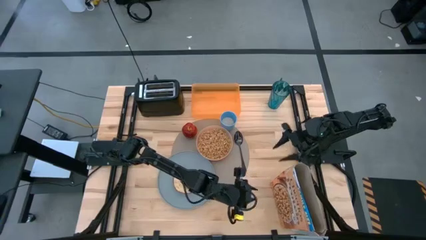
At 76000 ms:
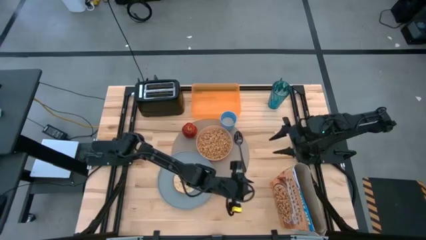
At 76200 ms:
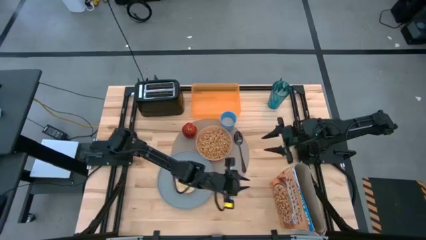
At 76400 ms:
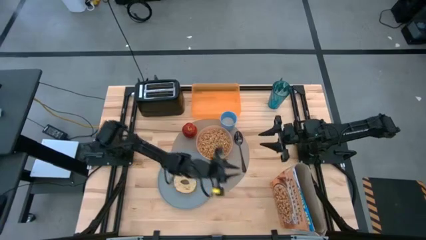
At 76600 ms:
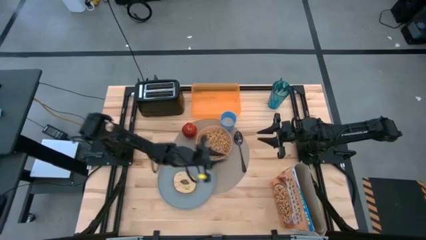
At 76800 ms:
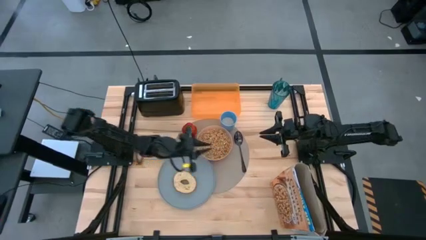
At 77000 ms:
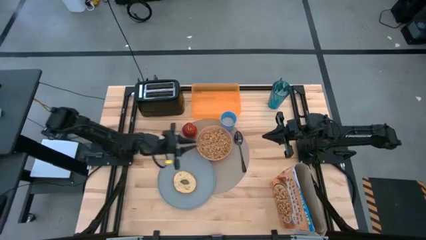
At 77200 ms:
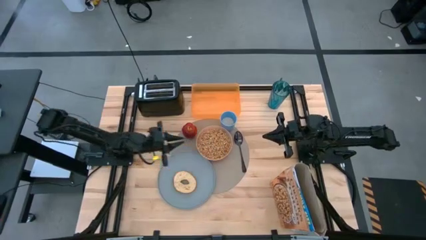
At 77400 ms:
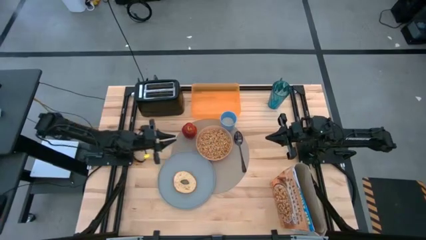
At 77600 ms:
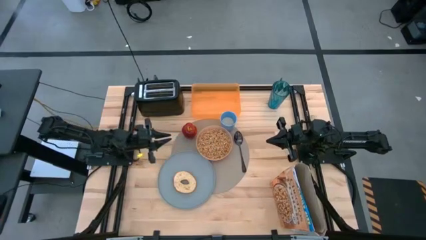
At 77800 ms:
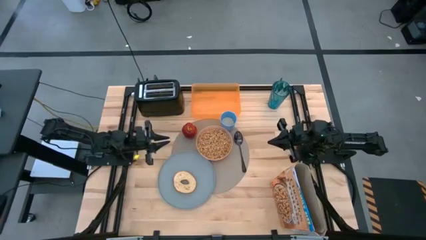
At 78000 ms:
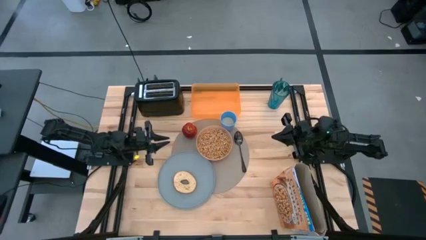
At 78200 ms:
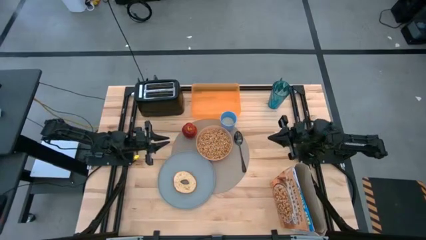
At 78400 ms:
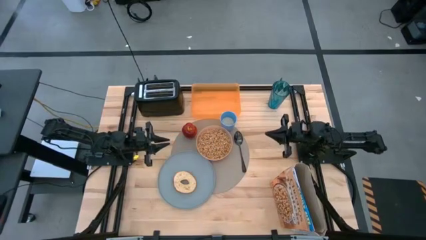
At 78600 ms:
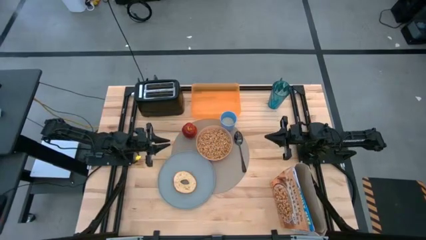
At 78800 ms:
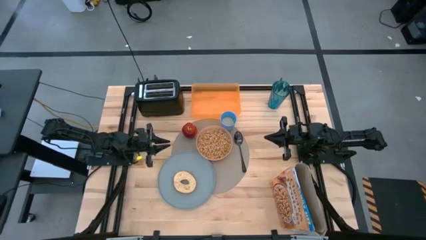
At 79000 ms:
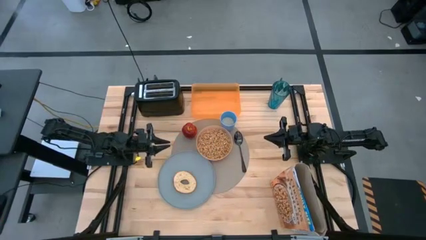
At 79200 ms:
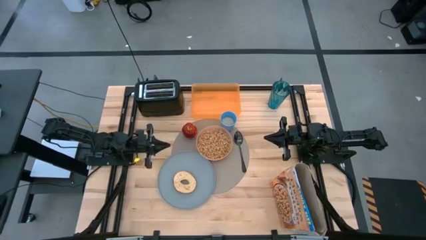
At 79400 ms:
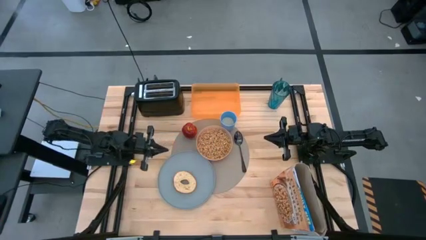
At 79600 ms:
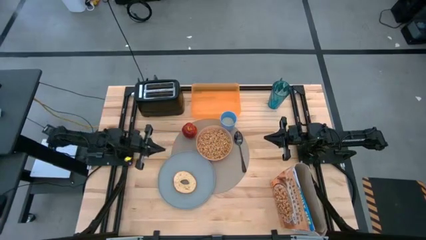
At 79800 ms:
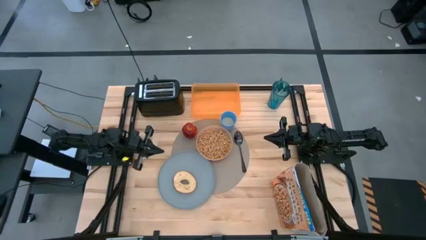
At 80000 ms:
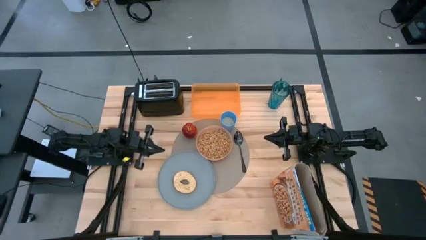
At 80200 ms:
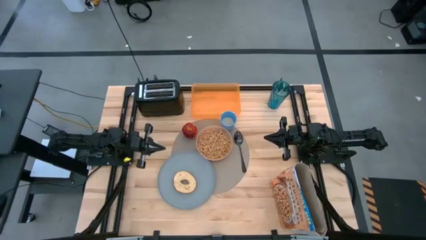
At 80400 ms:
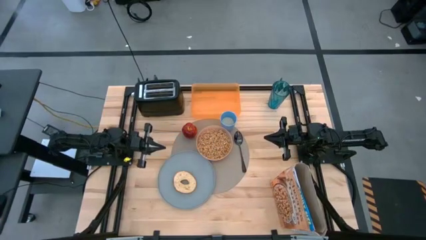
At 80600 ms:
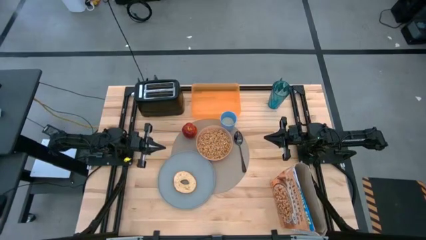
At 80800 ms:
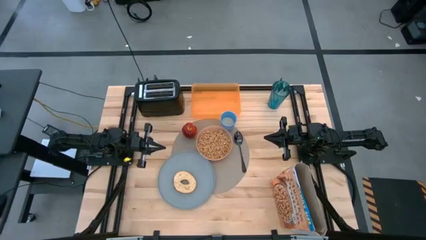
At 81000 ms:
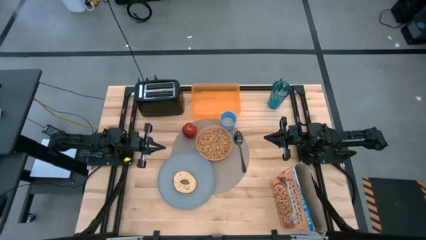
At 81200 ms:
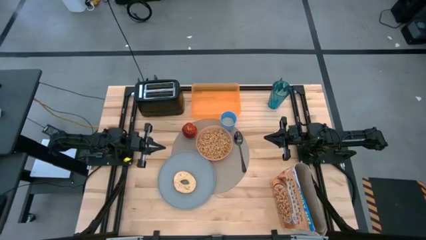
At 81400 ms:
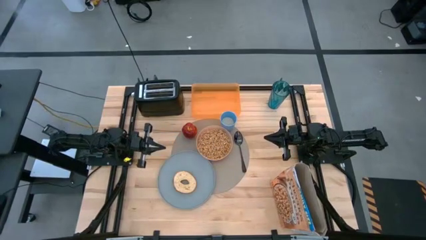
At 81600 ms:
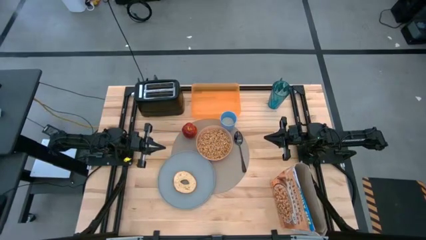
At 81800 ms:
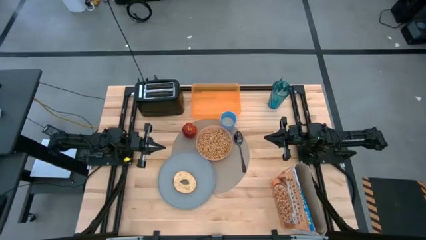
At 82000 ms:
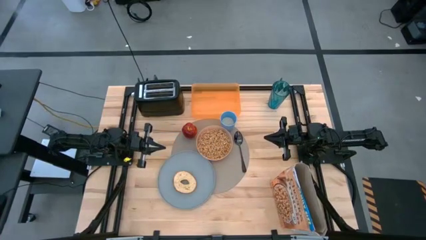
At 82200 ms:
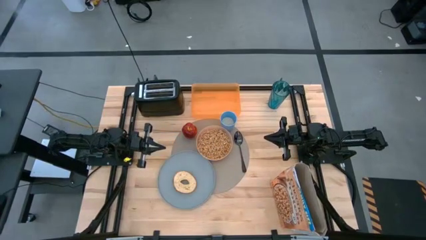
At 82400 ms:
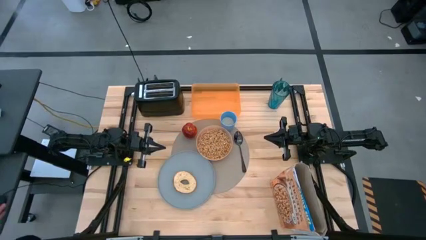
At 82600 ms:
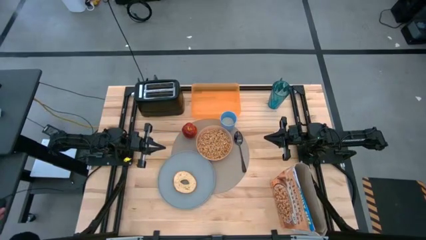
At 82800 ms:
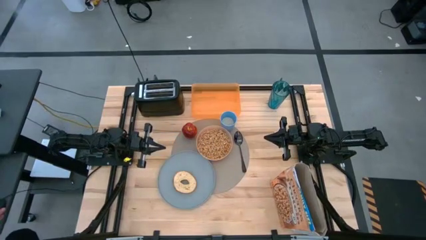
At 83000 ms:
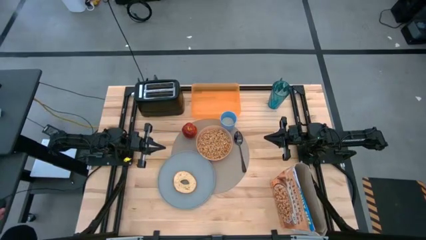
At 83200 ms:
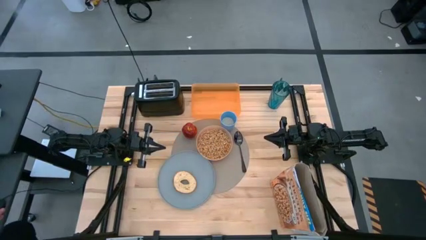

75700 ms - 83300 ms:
Task: Arrange a breakfast setting
Return to Home Position

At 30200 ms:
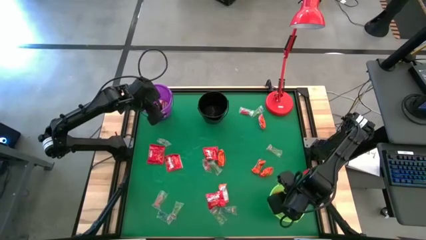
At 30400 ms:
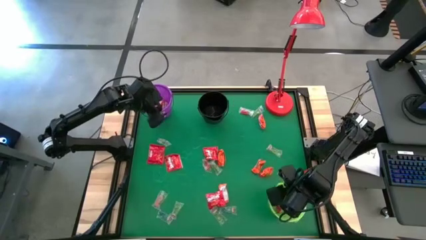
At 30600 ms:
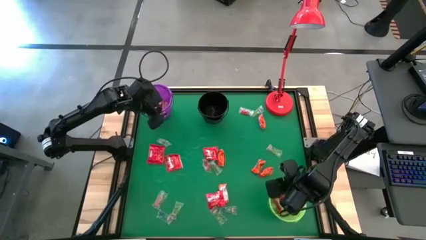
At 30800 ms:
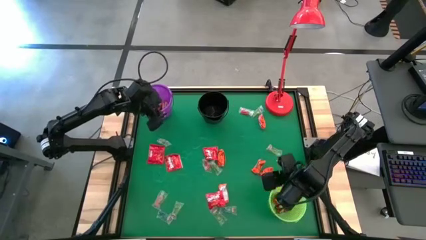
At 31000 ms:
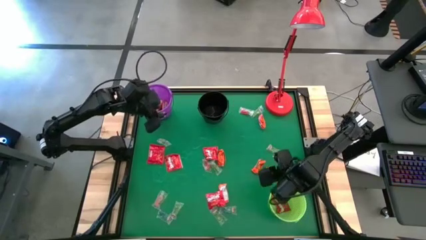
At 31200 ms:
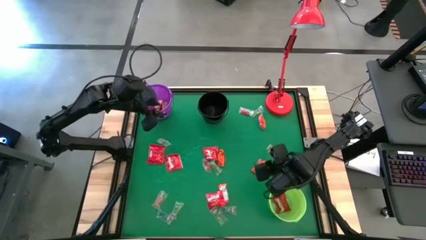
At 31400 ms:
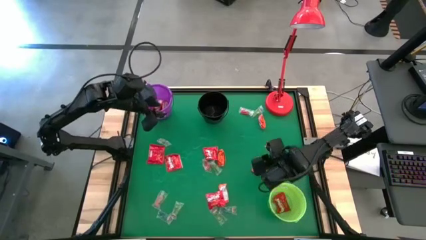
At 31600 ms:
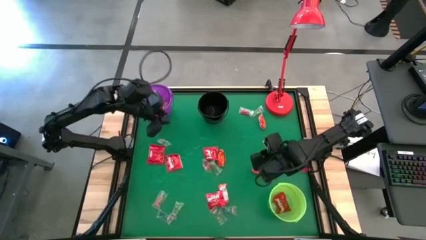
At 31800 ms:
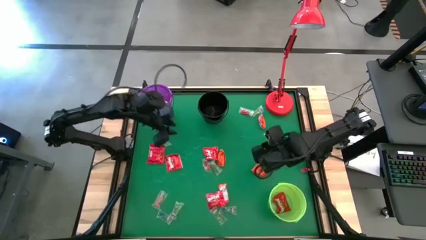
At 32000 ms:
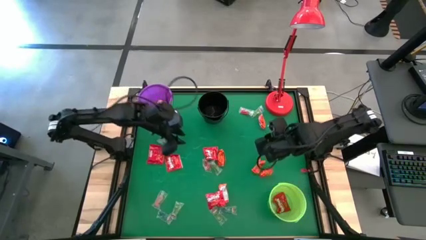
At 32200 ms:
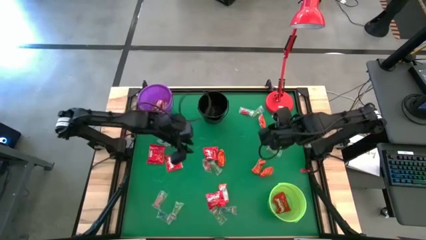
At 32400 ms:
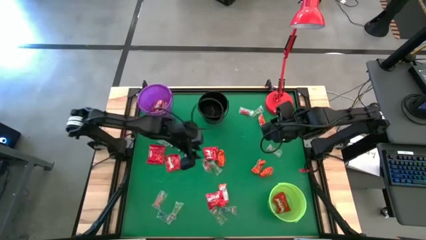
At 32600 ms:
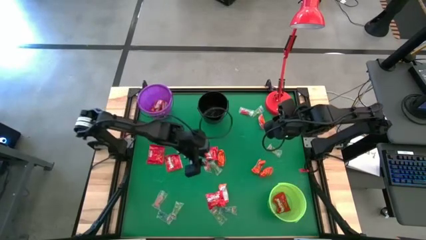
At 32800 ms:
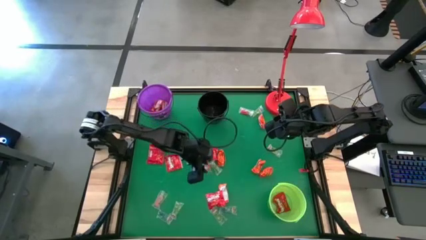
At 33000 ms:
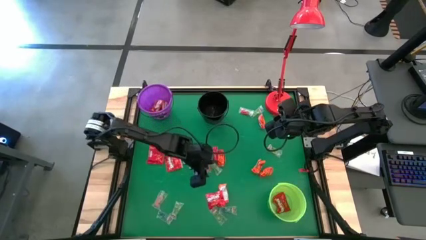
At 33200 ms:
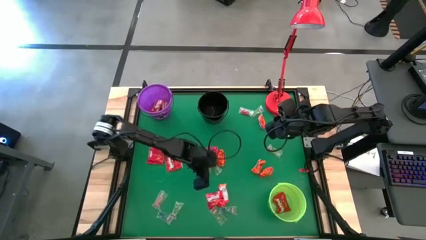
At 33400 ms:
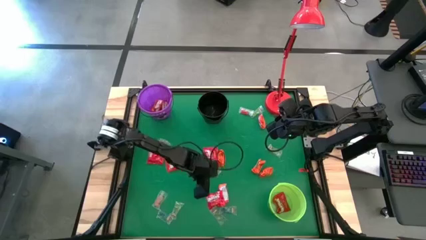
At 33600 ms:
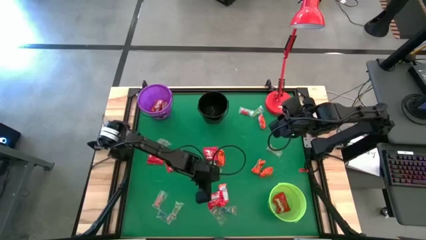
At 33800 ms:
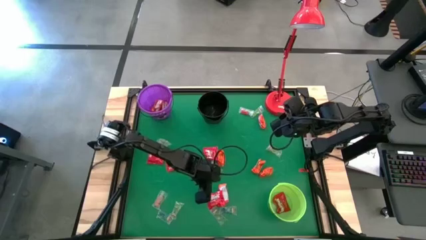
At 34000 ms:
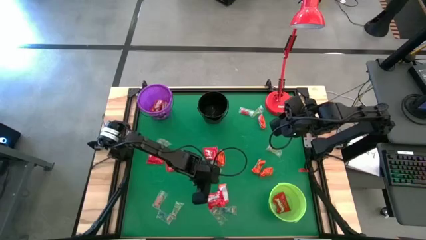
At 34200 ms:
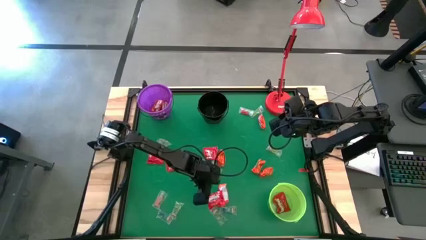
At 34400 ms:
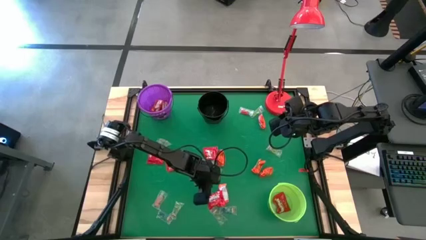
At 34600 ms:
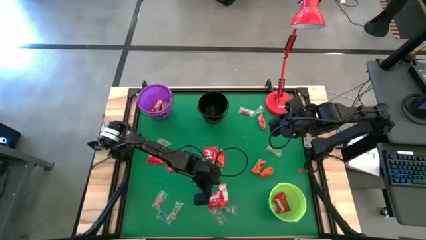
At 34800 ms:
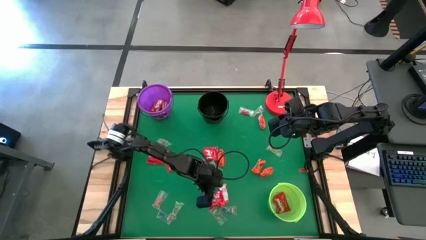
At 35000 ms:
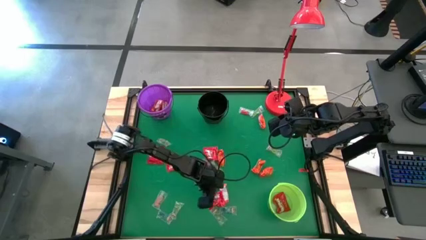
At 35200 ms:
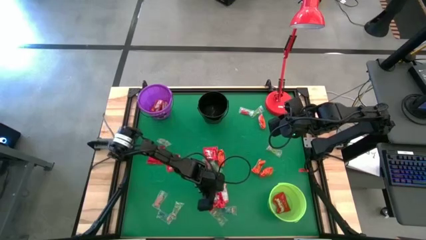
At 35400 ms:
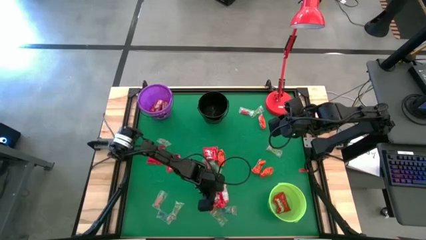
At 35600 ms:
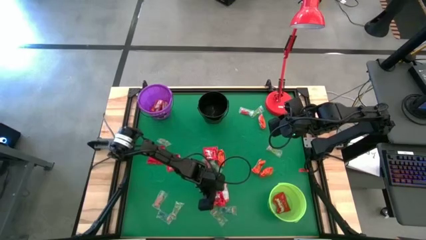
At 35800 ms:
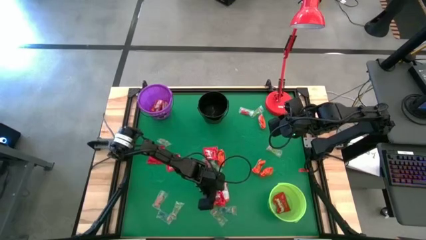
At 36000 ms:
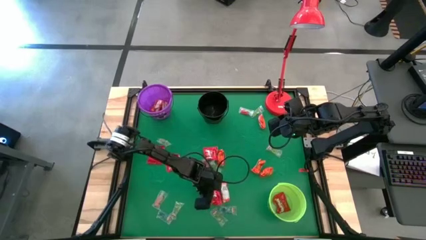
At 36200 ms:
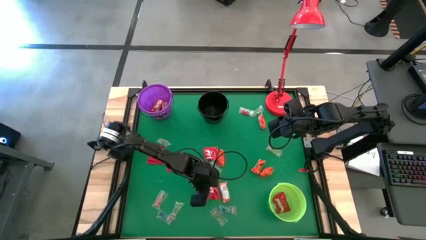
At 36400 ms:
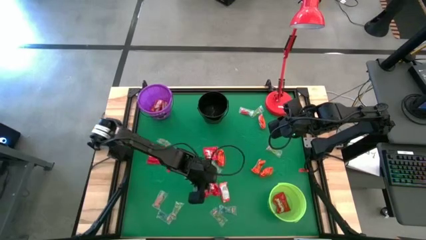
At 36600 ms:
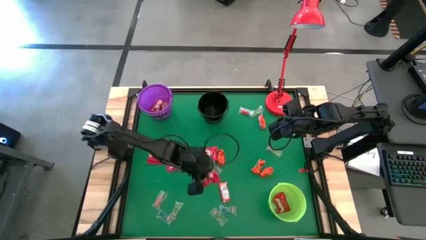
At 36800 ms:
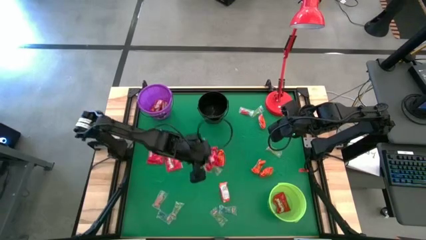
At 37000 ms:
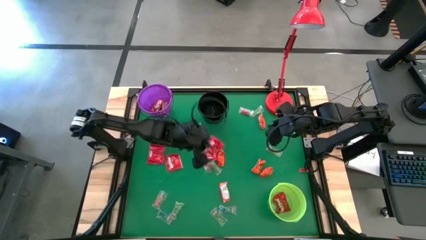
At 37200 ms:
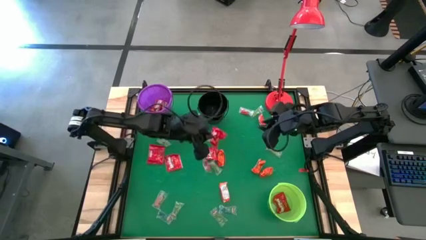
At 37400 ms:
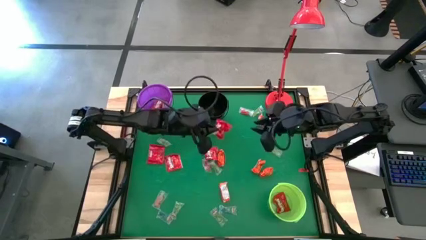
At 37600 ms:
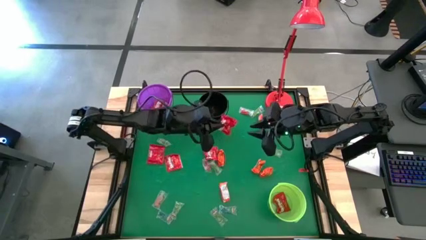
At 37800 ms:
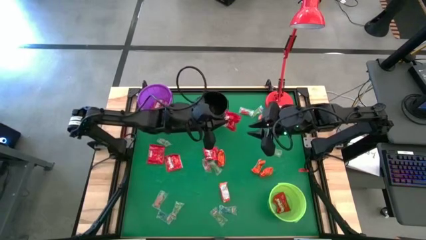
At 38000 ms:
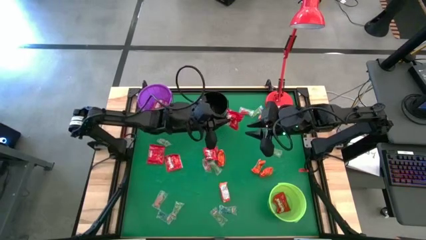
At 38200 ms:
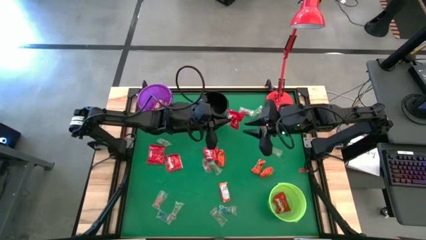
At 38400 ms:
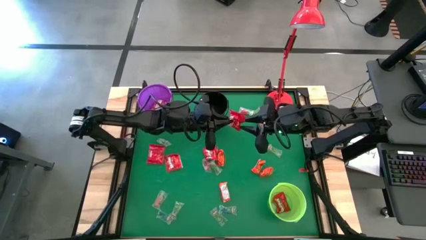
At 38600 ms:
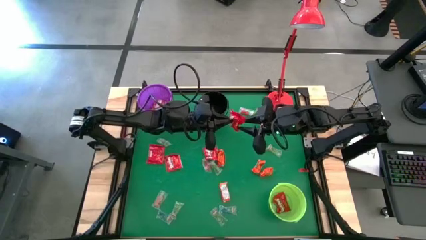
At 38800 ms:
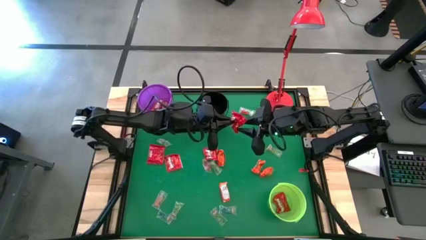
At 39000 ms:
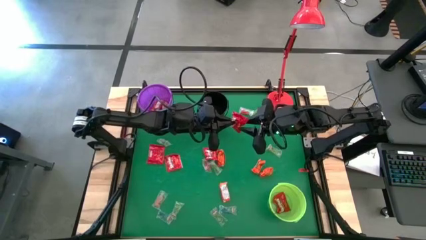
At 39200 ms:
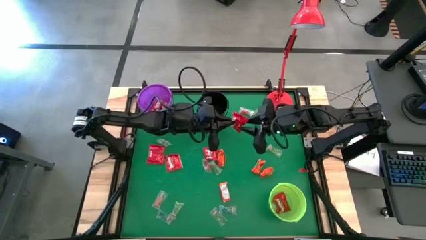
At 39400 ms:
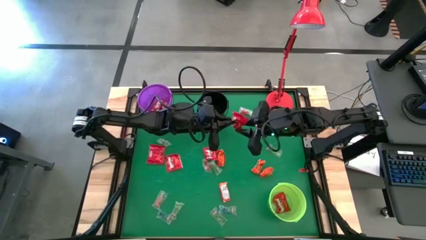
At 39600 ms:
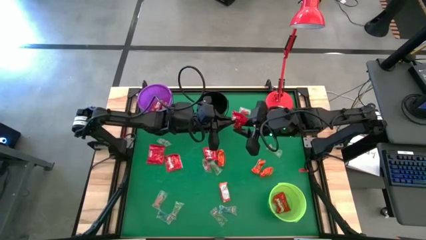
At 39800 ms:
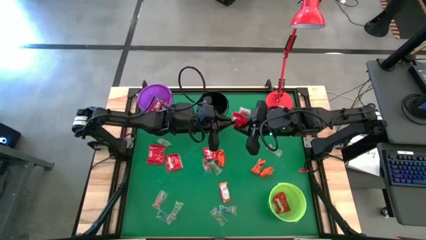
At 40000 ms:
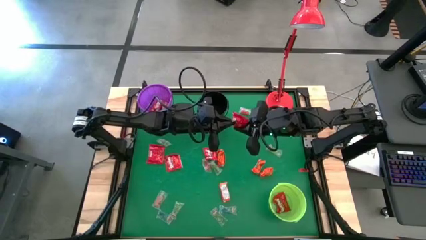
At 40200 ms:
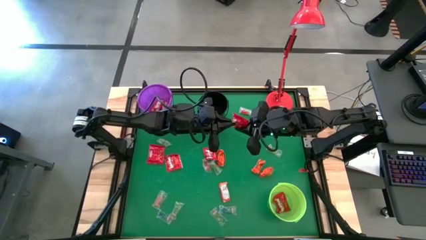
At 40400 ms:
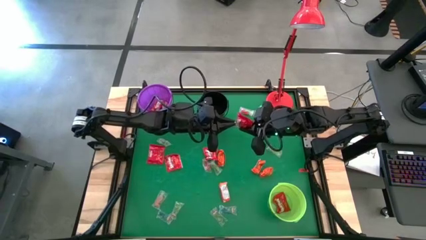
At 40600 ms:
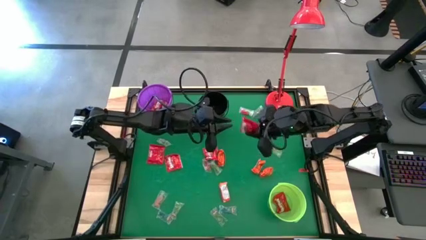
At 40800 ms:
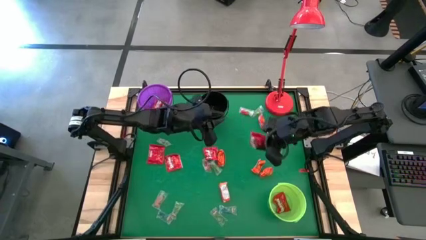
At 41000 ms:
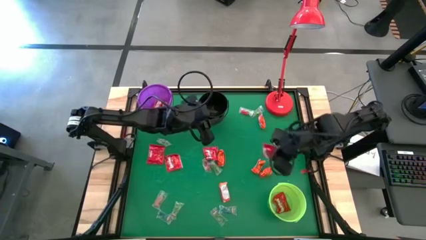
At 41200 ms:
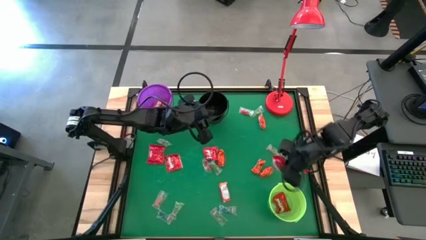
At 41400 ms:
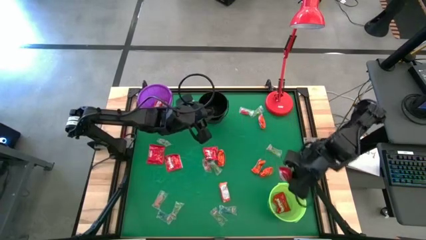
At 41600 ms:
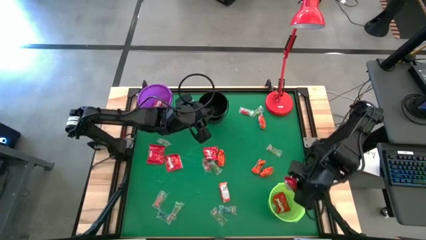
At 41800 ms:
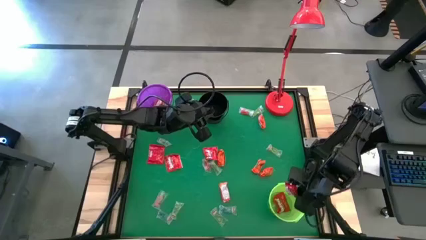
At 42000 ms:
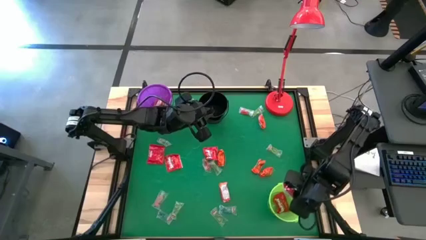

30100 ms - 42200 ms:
Task: Sort candy
Put the red candy into the green bucket
